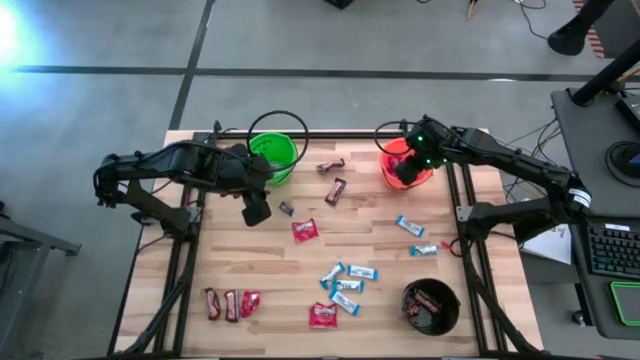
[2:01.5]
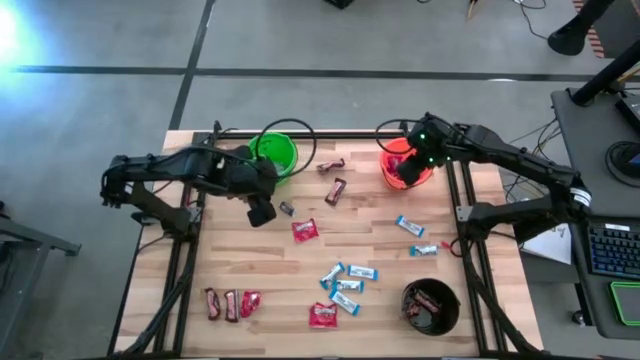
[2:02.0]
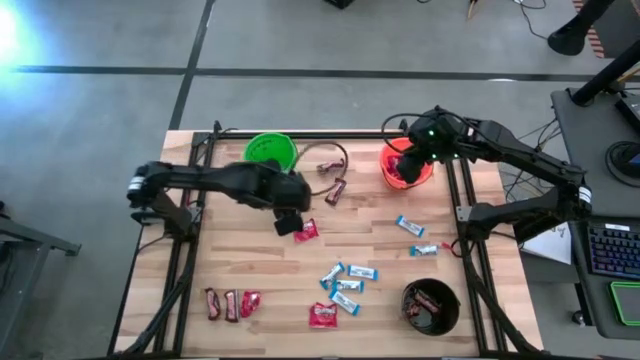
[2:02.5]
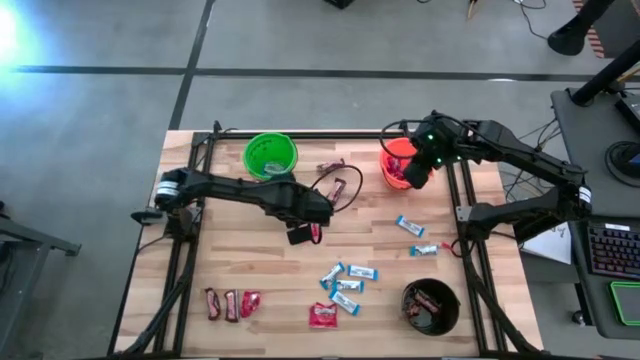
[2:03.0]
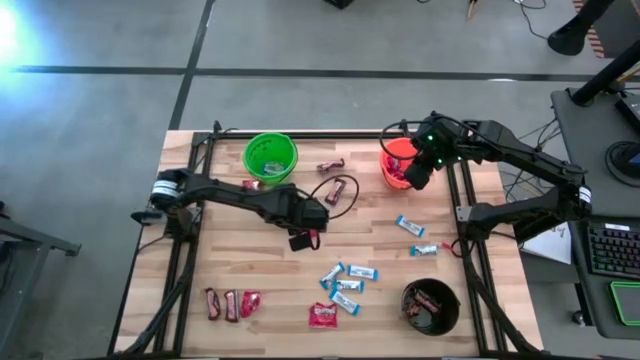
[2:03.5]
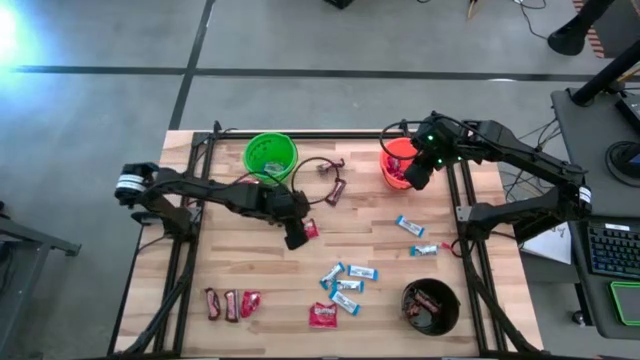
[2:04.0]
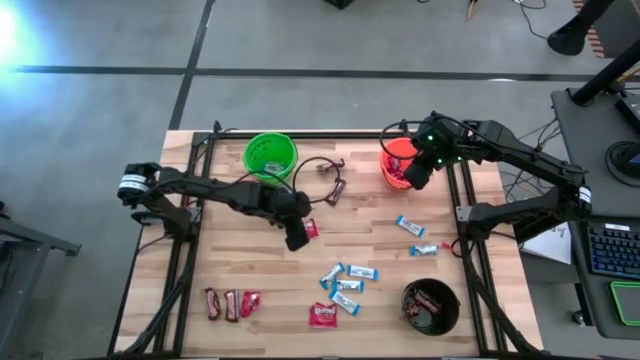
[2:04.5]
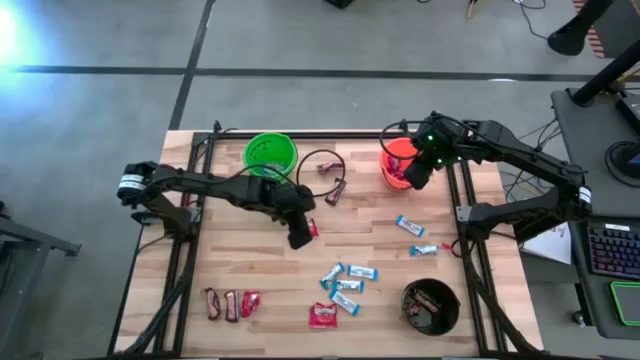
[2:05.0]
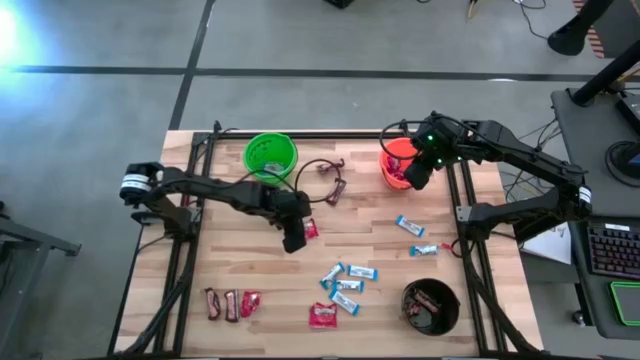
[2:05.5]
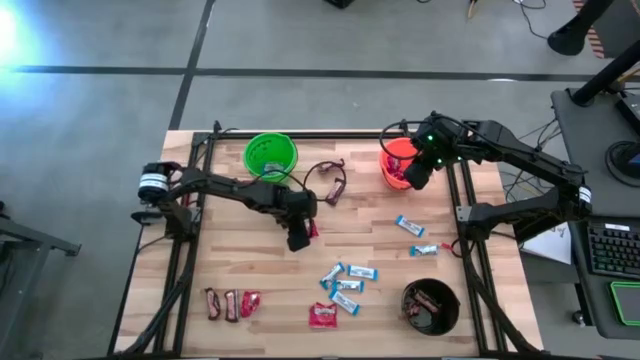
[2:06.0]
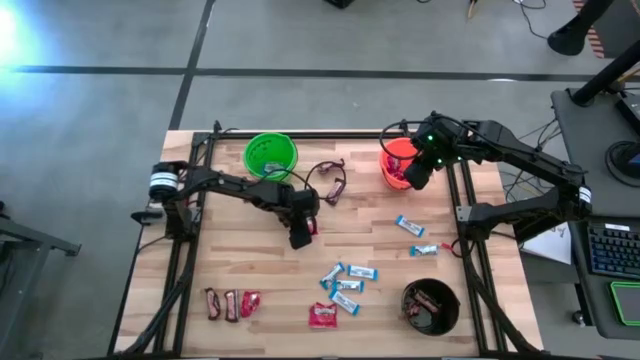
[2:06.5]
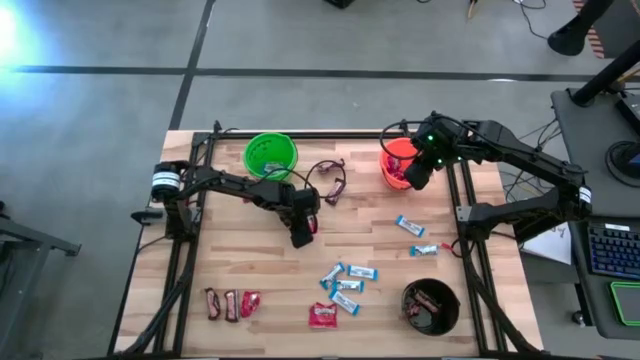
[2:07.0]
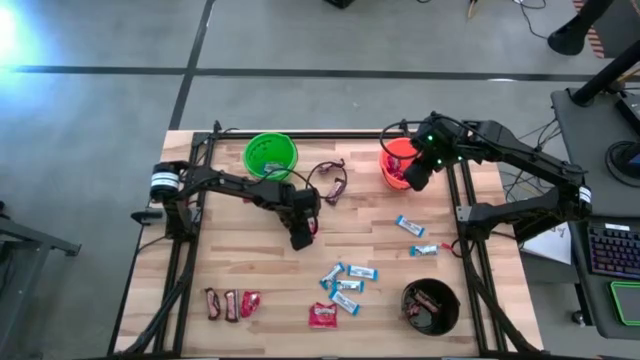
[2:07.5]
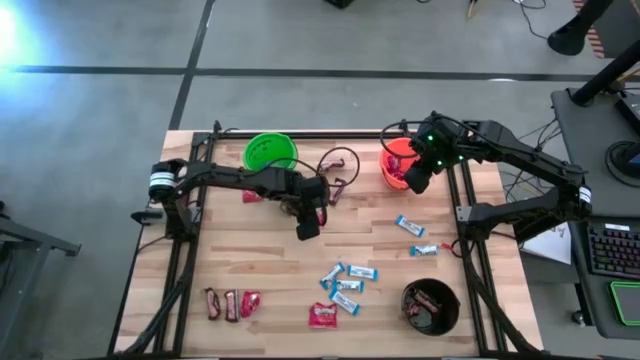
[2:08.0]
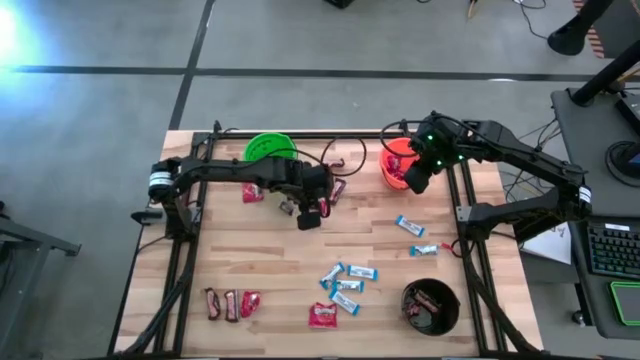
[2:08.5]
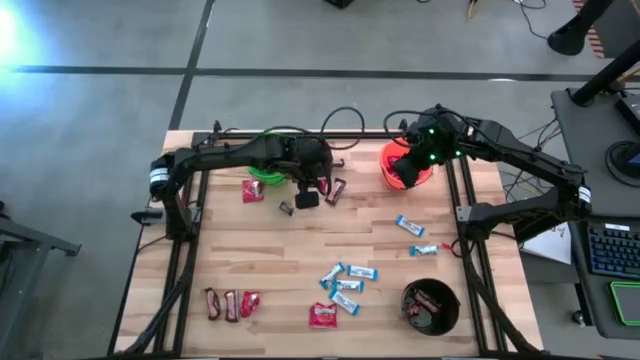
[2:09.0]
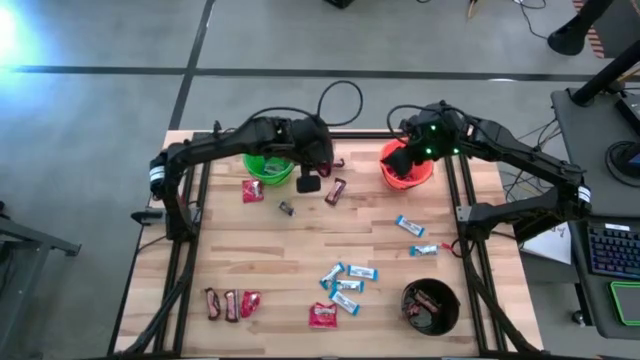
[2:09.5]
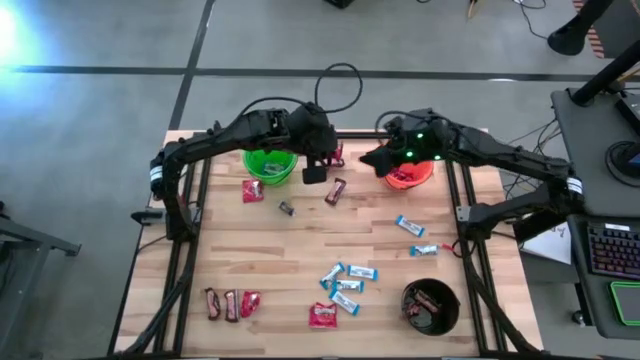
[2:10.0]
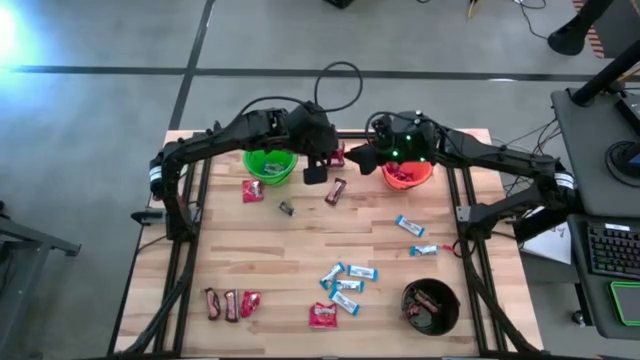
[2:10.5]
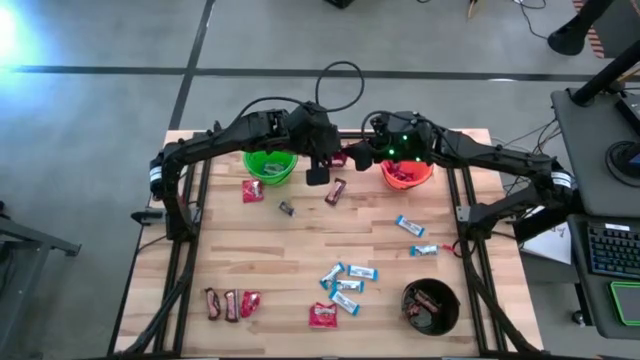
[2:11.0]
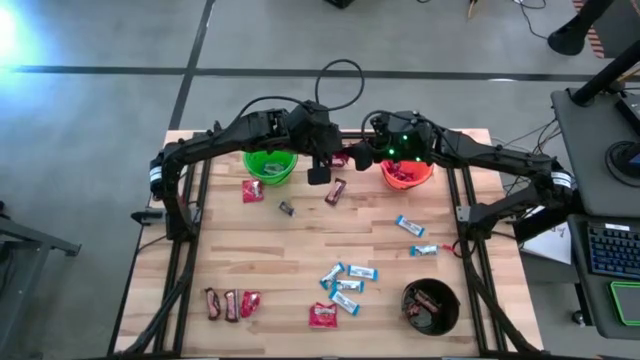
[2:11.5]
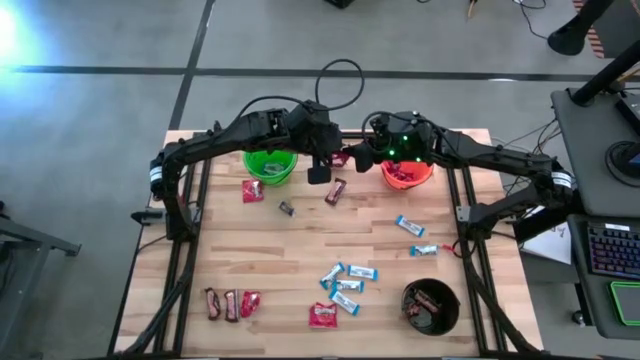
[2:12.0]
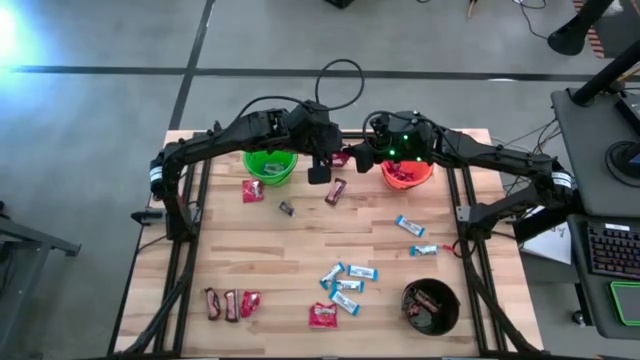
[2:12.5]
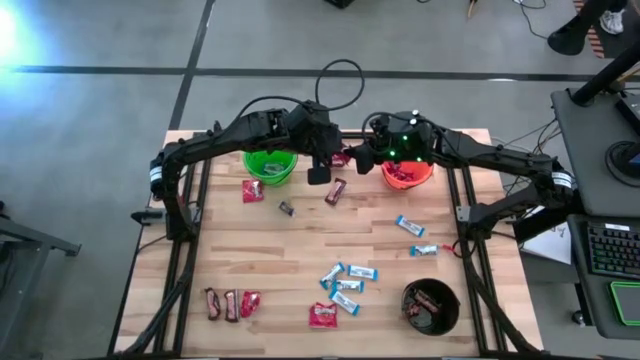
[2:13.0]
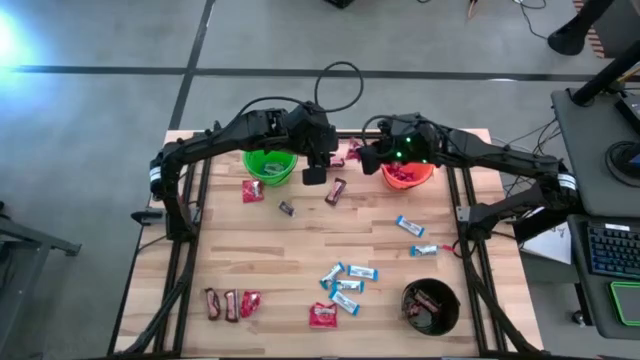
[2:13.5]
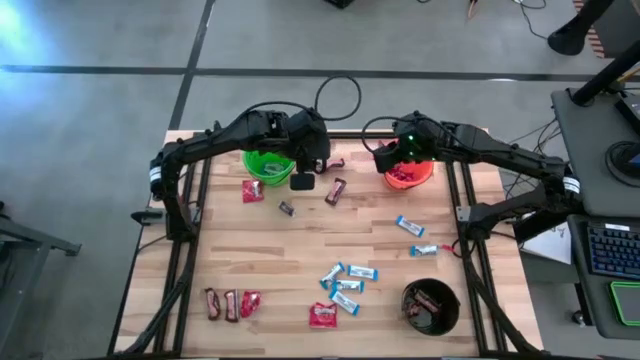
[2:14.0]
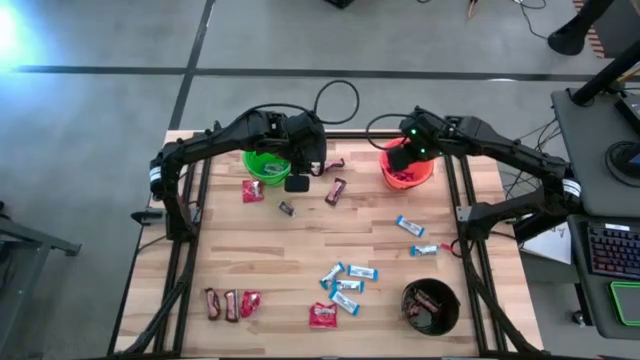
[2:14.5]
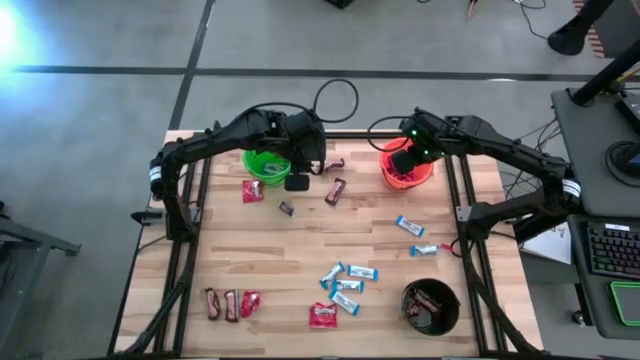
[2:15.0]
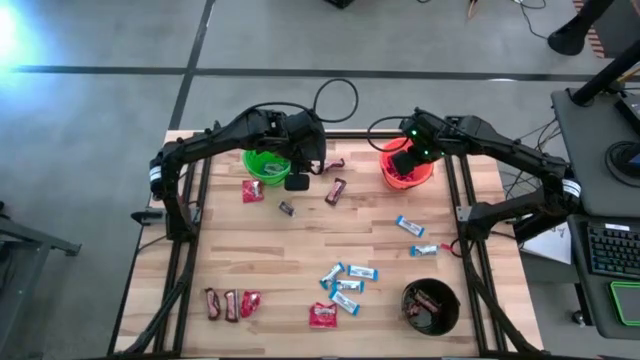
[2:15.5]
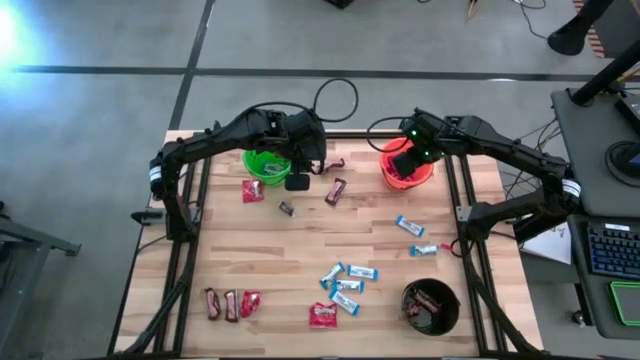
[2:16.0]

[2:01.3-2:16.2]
Task: Sort candy
Put the red candy into the orange bucket

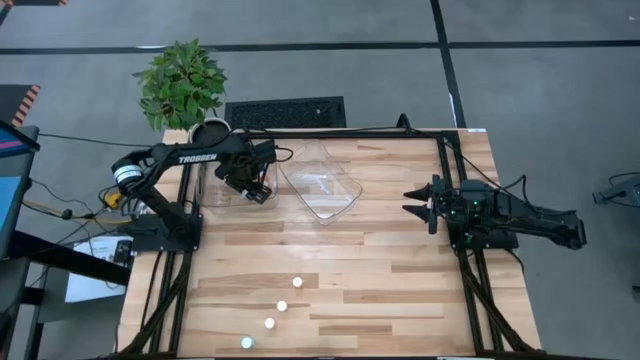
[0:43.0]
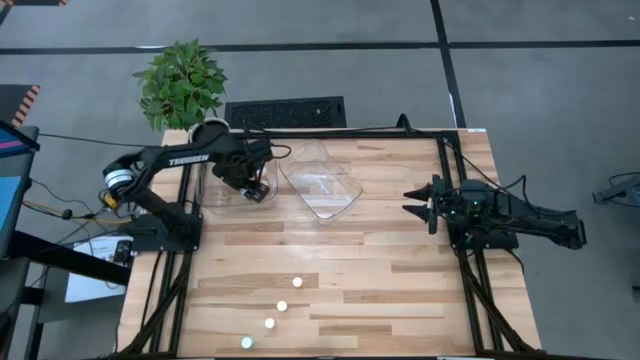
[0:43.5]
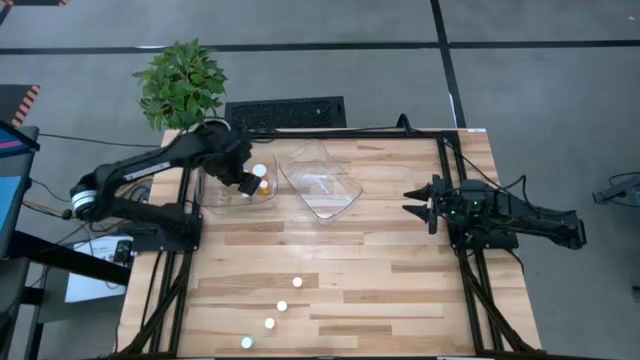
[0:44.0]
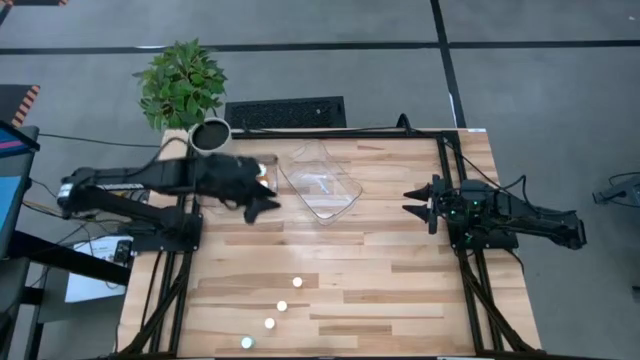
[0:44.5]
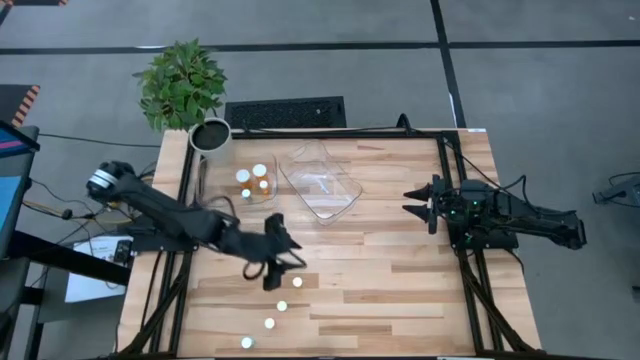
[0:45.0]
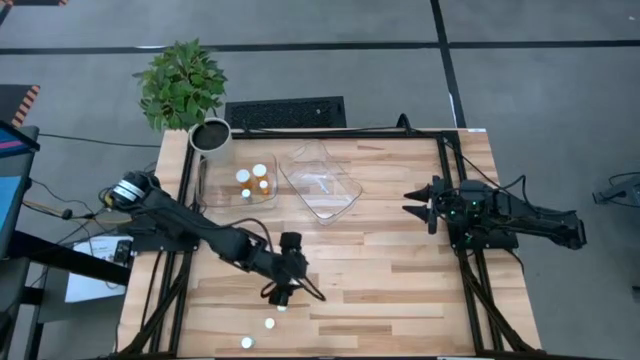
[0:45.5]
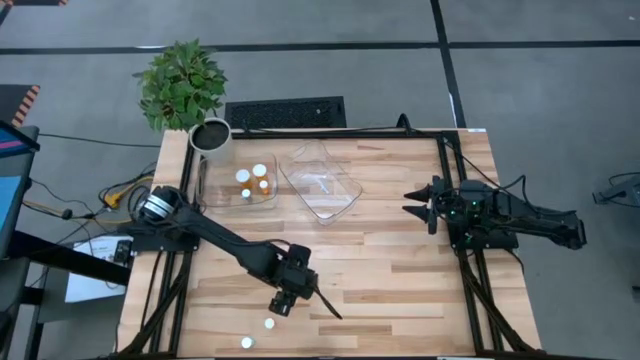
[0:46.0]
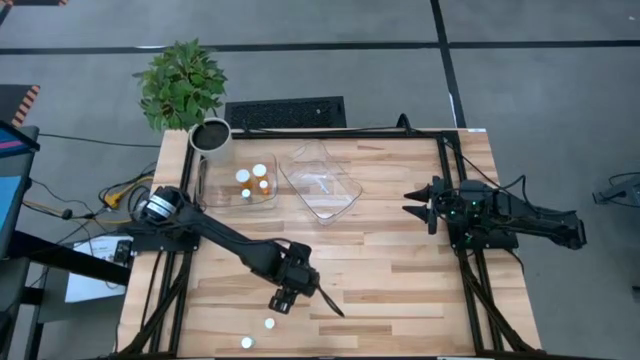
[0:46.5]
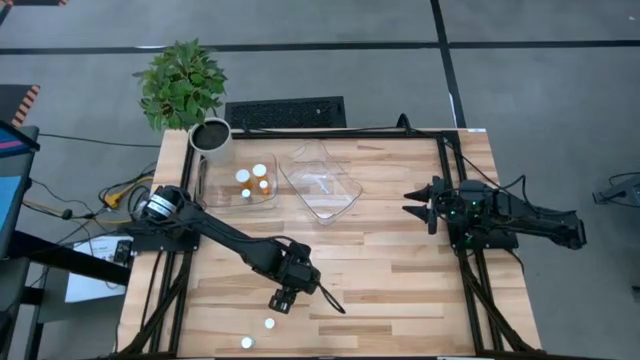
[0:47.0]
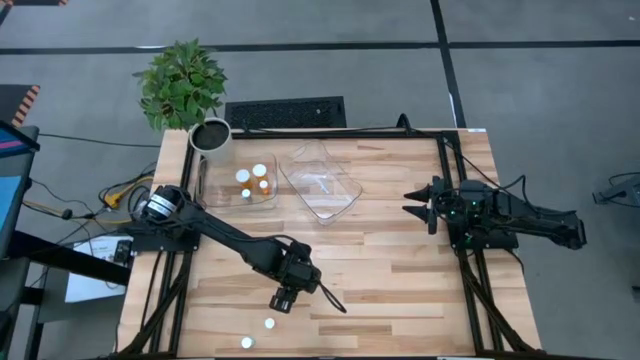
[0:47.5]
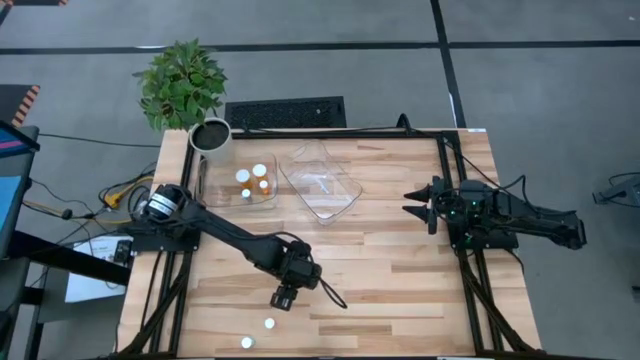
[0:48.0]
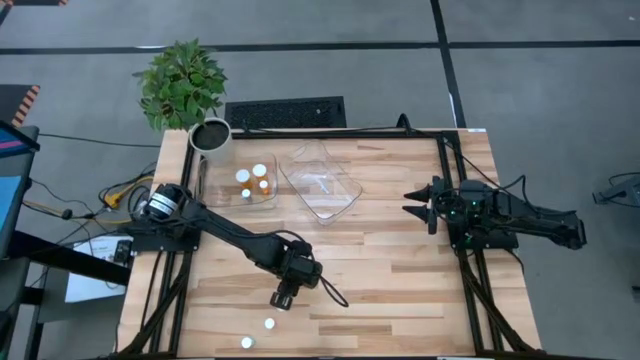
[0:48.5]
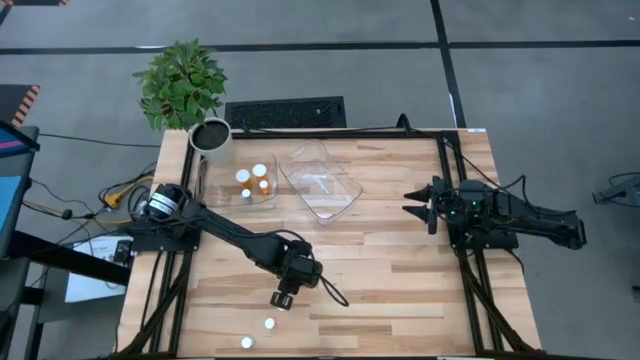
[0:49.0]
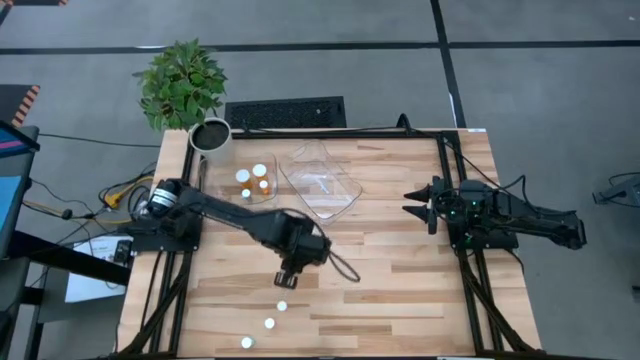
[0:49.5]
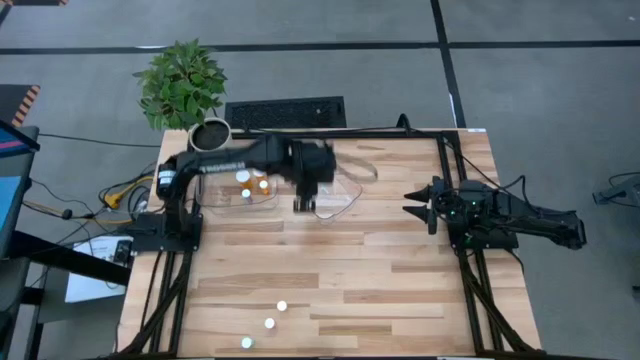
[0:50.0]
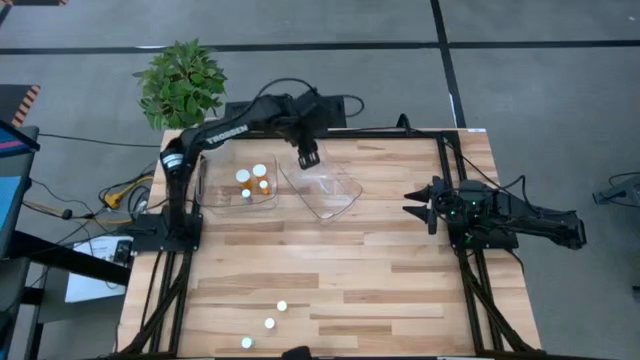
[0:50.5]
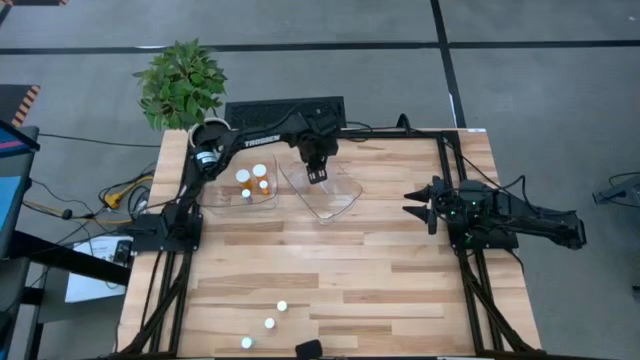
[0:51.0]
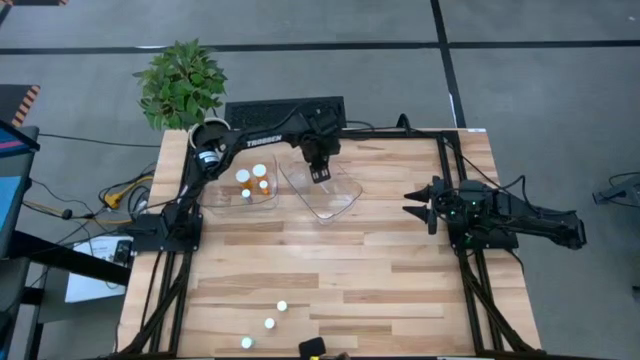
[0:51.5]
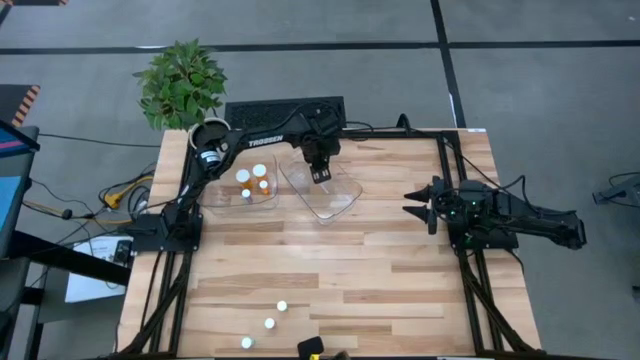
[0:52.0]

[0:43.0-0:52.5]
Task: Pick and place medicine bottles into bin by pill shape (circle, oval)
Put the small orange tablet bottle into the right transparent bin
